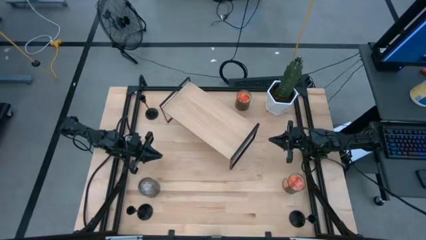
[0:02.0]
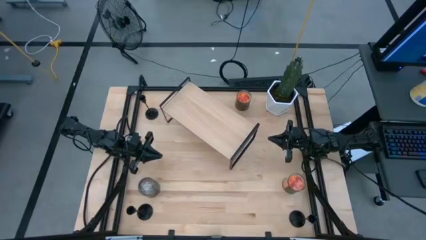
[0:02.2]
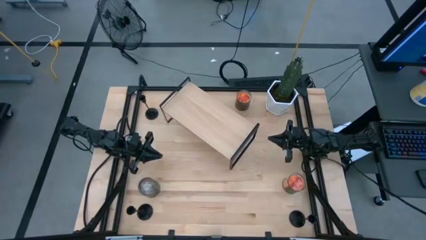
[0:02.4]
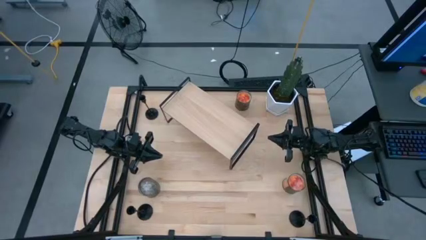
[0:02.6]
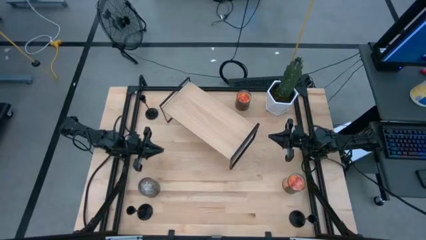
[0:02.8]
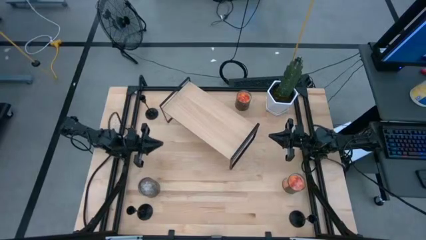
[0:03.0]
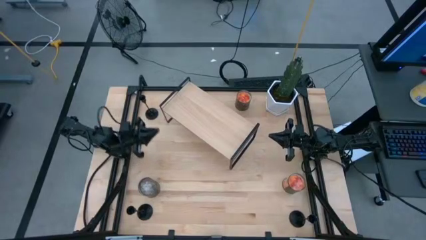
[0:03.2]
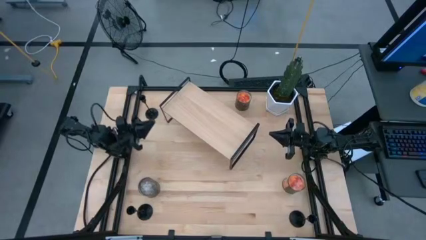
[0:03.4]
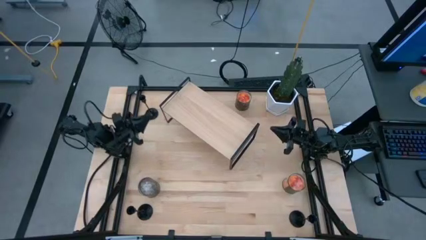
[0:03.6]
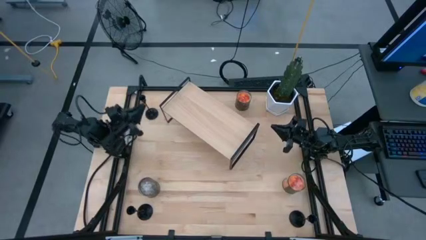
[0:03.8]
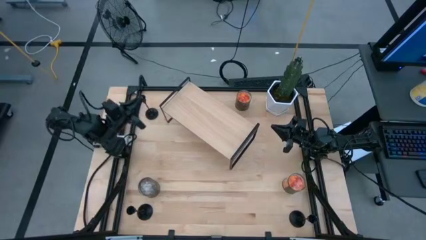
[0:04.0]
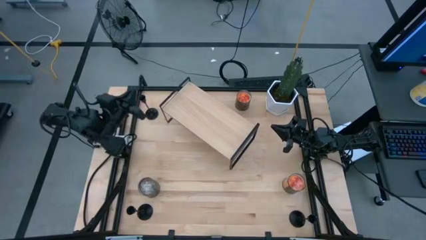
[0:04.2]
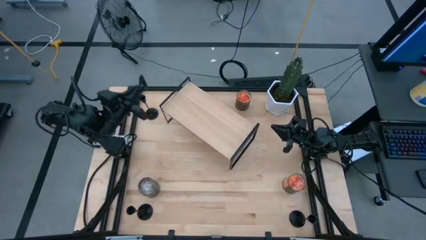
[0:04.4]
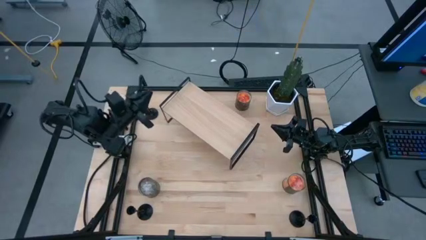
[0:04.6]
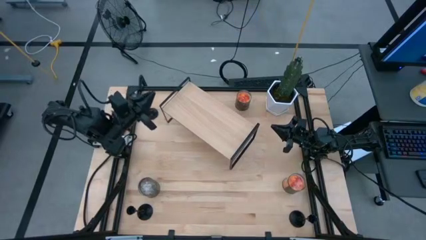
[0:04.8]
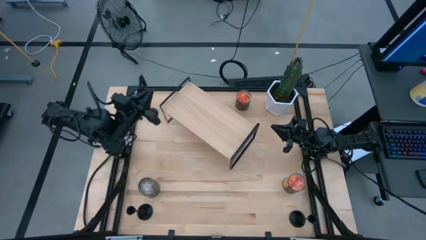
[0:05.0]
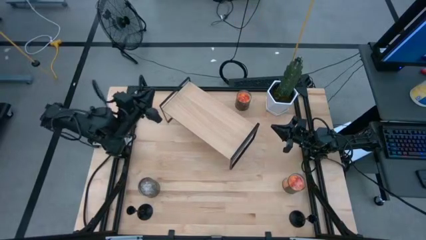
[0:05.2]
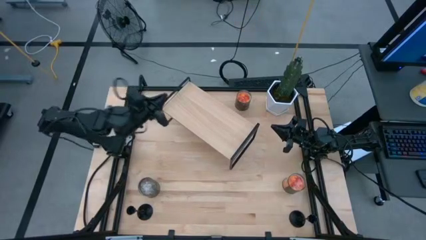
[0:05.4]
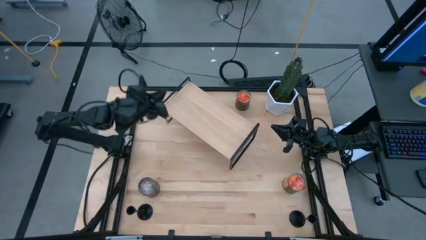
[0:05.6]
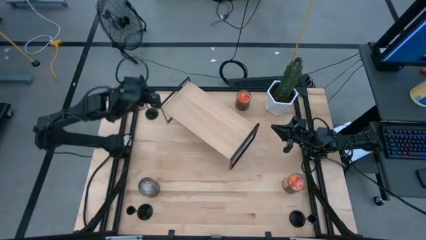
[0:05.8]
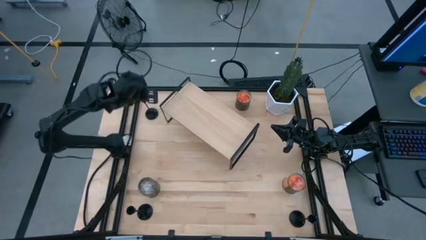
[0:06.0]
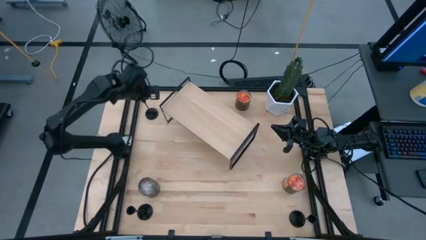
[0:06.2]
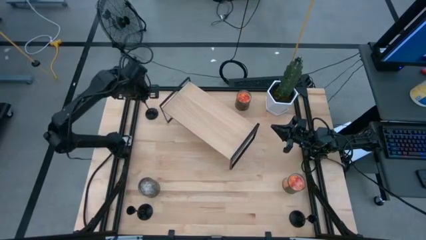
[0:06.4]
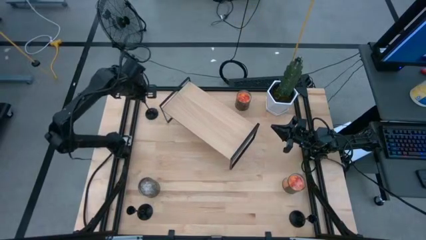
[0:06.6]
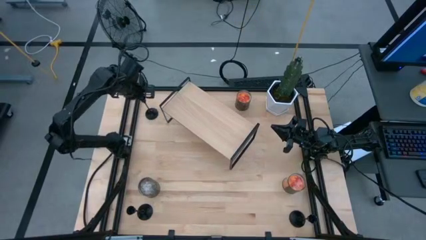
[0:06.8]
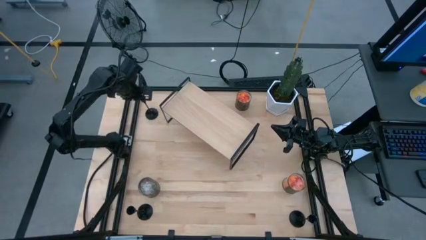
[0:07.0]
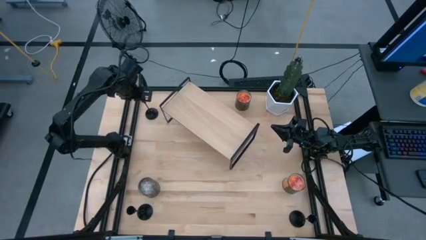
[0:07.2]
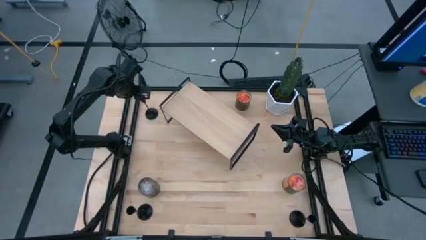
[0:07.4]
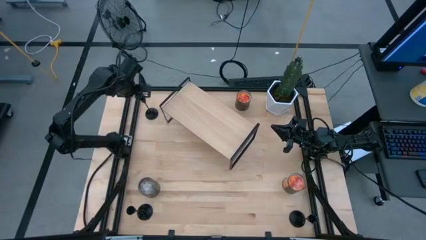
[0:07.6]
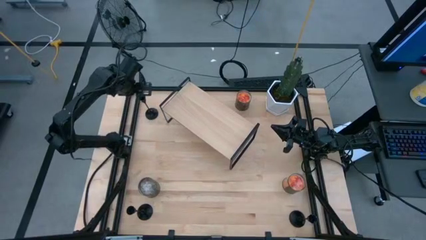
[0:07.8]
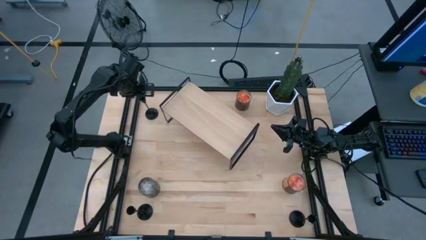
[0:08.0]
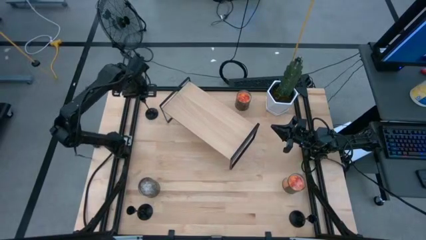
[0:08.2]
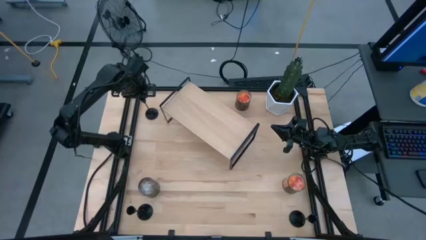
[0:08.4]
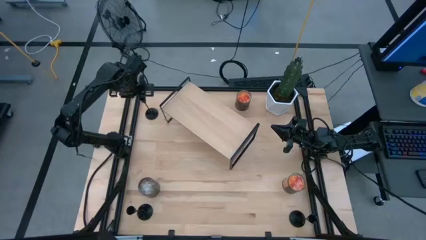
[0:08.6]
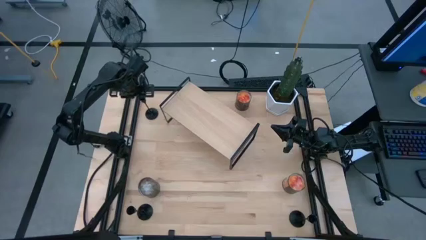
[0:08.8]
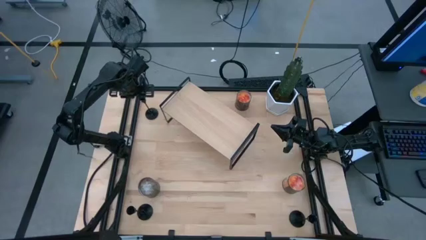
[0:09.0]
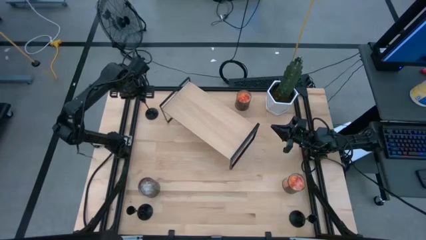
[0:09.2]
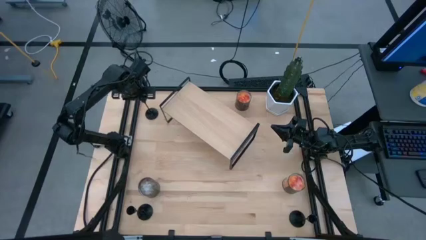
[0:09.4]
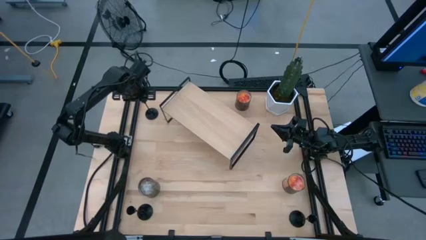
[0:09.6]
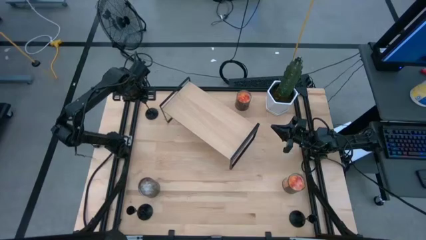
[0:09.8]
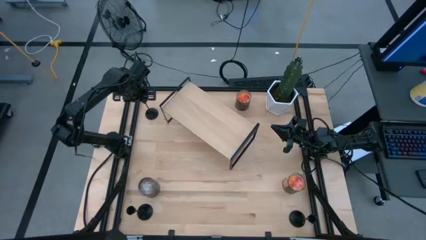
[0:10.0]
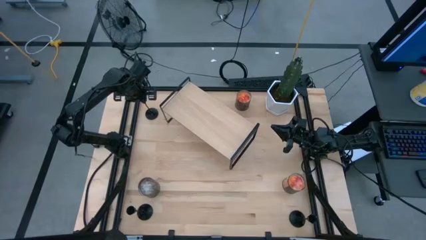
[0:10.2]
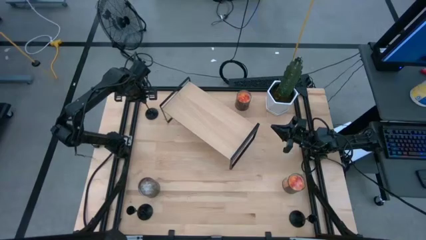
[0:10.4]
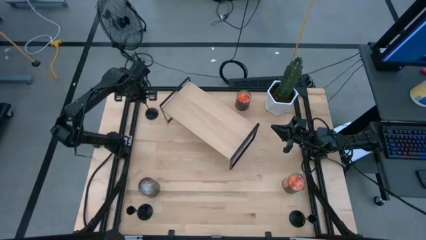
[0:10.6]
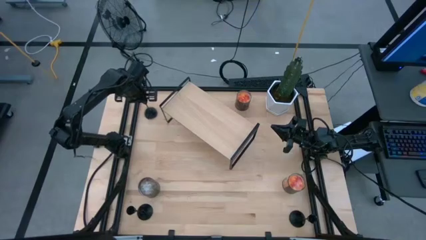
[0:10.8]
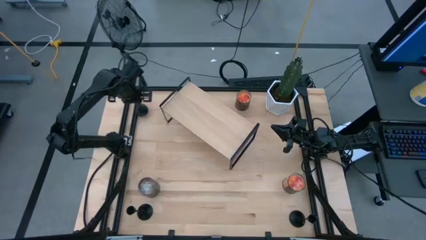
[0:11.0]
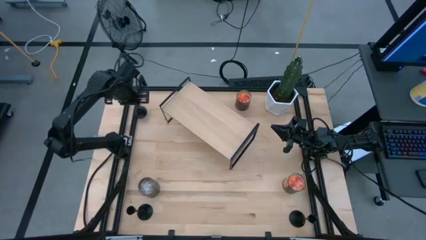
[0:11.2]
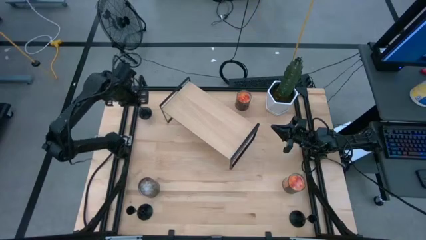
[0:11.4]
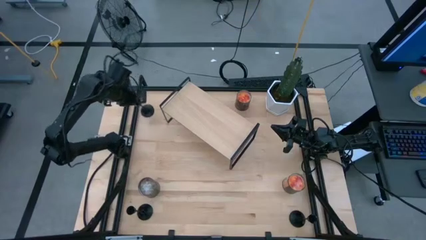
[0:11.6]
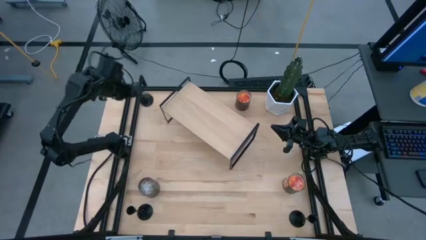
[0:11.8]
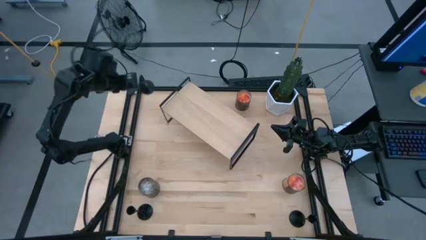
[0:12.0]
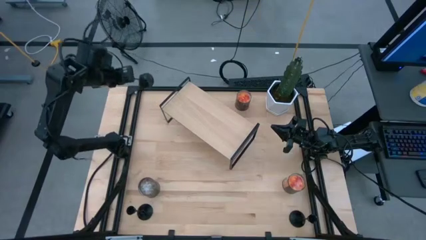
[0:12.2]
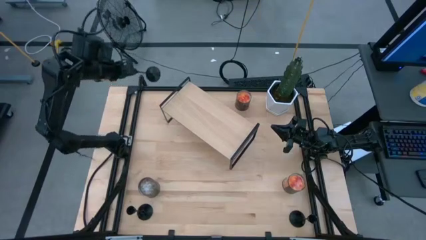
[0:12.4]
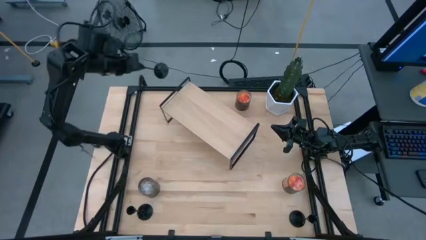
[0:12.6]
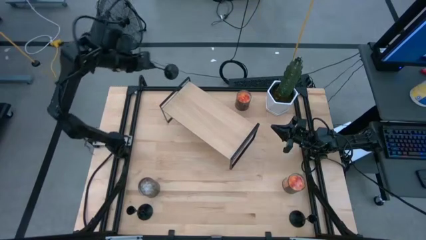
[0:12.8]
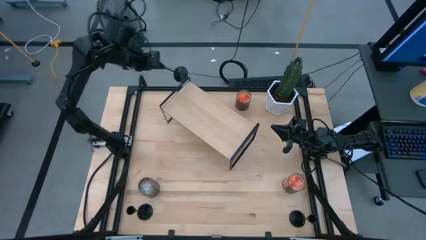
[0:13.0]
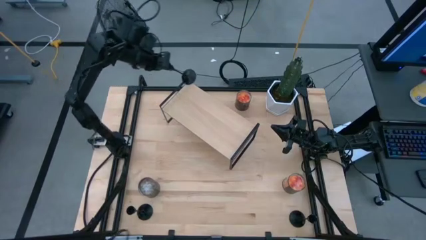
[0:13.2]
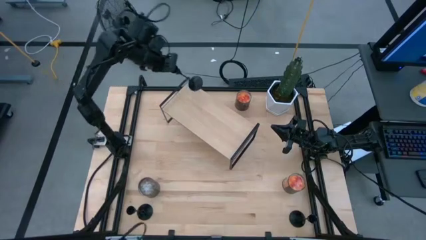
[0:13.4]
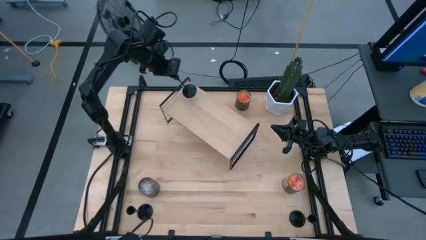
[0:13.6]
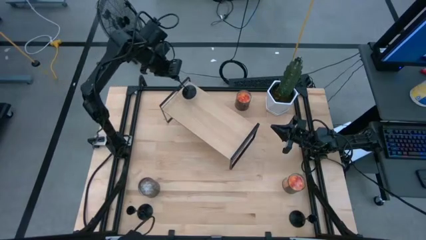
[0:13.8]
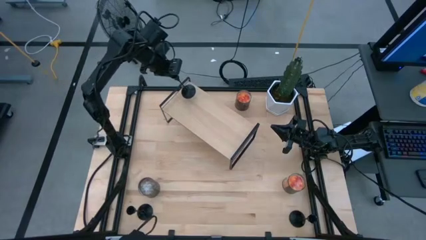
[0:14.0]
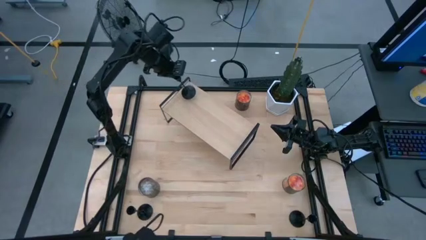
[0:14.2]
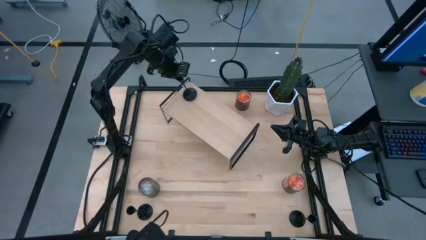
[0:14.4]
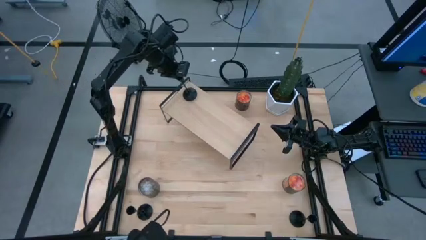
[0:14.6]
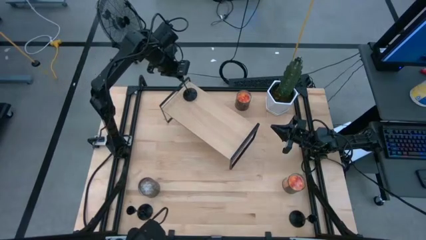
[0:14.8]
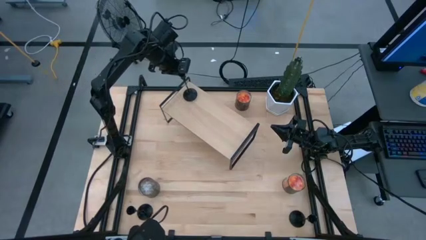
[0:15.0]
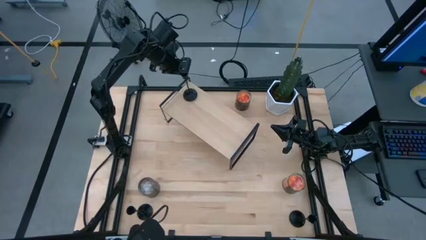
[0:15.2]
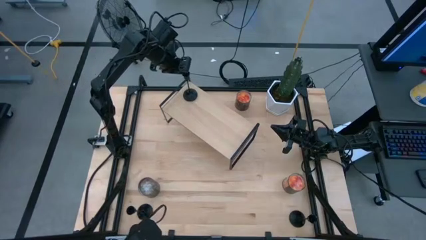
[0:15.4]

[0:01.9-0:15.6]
Task: Pick & Place candle stick holders
Put the top black candle holder on the shelf

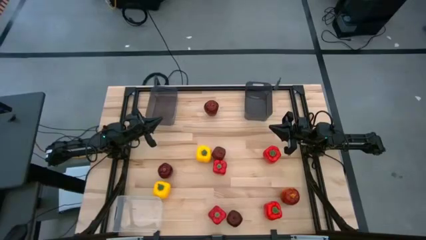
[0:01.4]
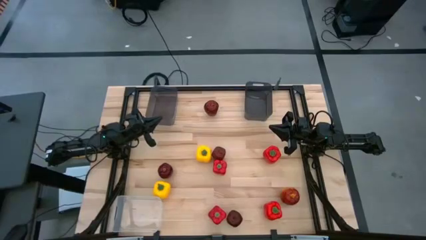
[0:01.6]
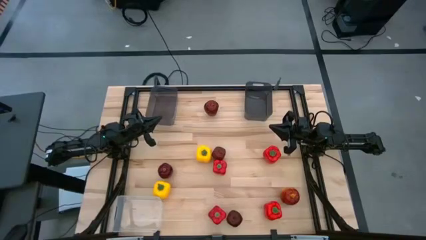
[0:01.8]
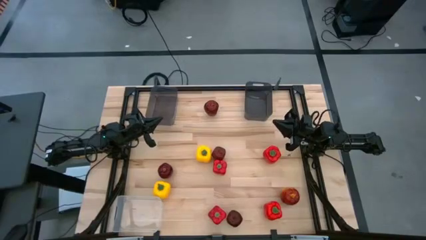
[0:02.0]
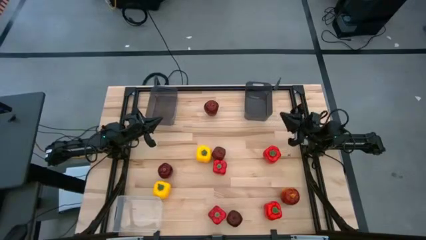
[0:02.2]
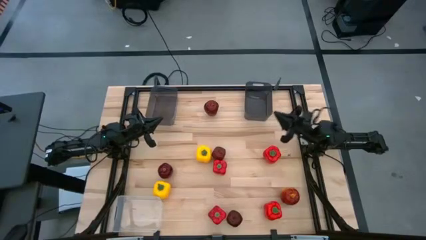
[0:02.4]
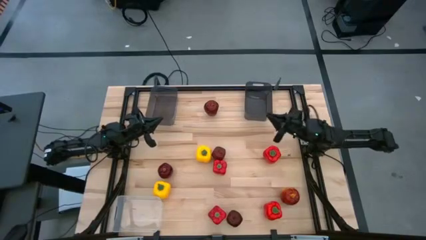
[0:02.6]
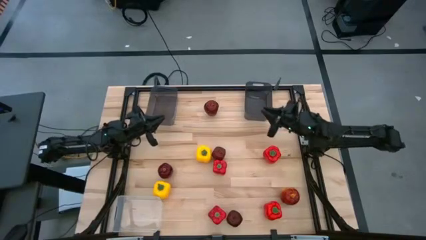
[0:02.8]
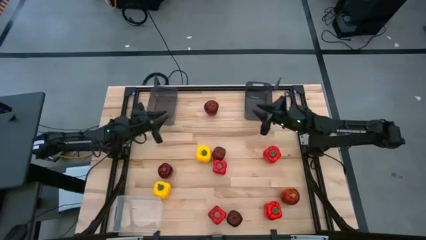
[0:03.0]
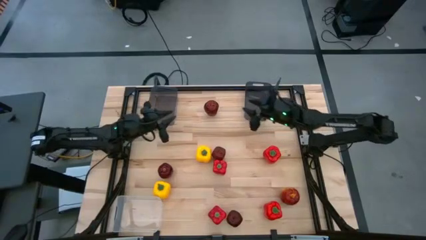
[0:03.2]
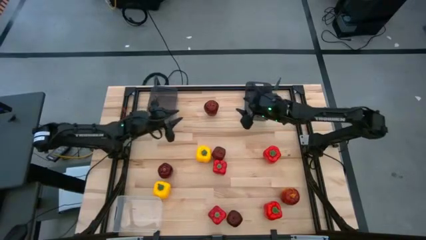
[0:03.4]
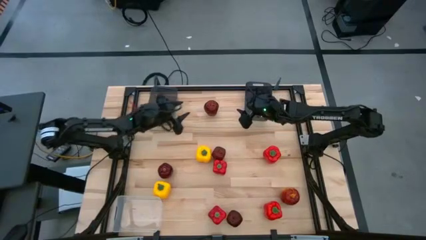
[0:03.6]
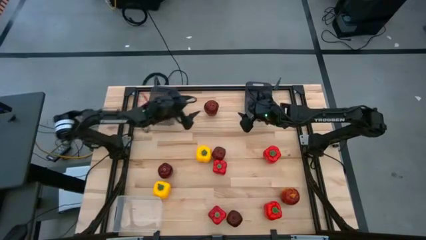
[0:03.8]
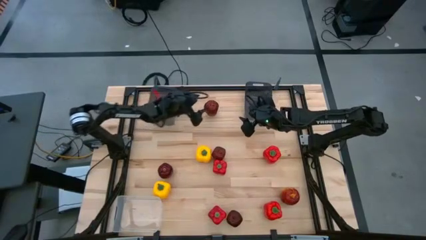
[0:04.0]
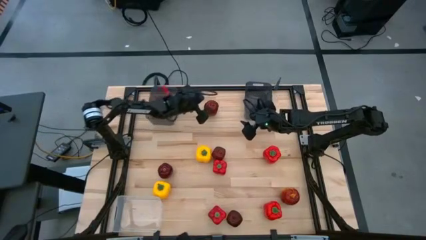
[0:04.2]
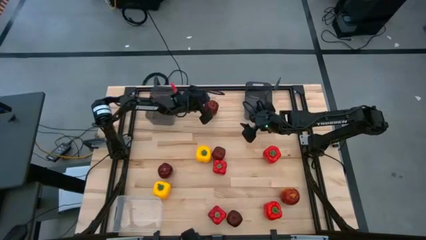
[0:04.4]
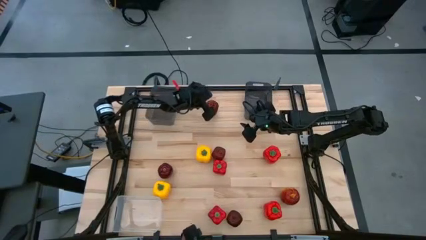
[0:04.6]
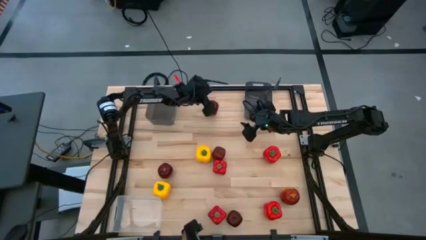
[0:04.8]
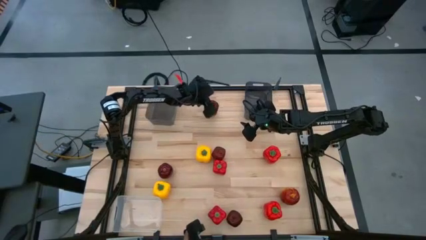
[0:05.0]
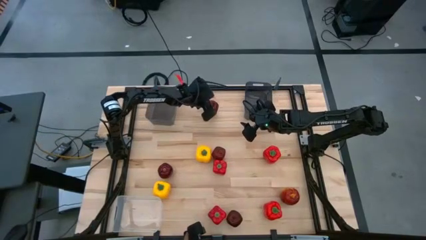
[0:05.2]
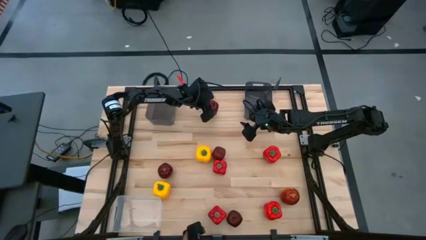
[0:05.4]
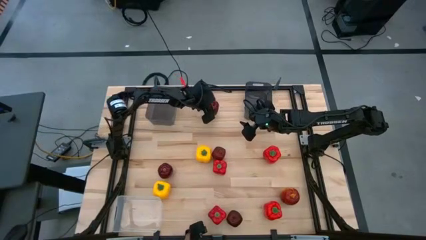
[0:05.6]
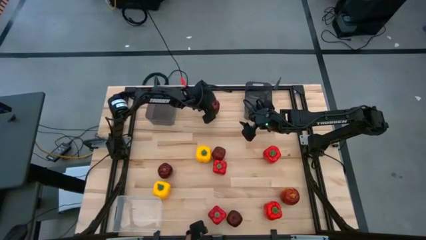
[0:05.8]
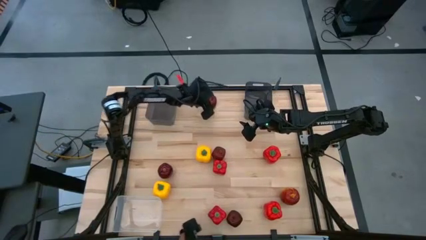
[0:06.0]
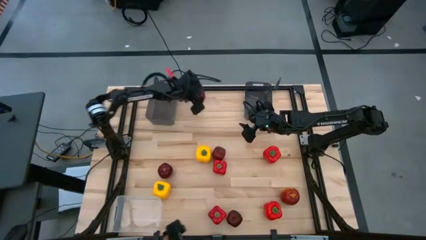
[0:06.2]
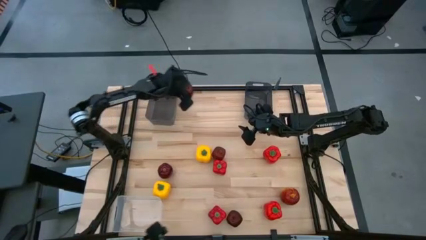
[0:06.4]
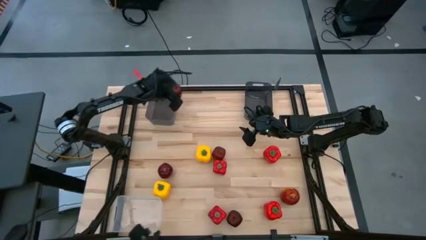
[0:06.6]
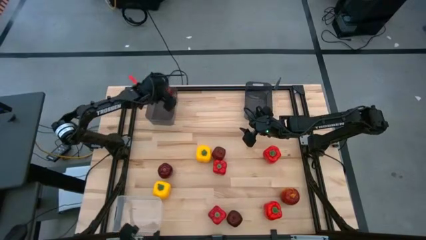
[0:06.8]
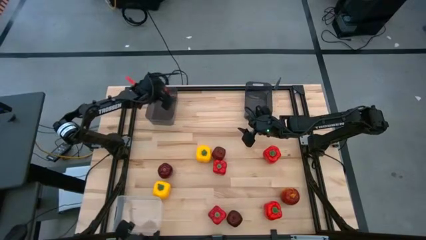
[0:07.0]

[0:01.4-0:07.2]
Task: Sort produce into baskets
Put the red apple into the left black bin
